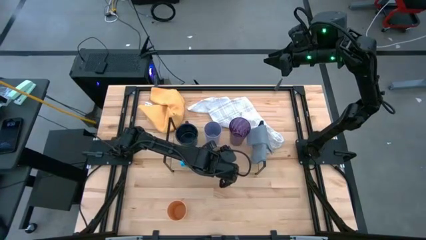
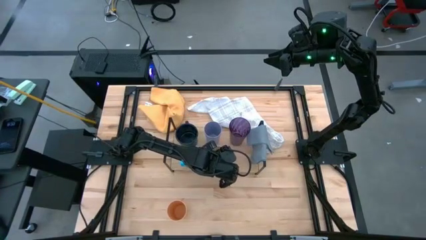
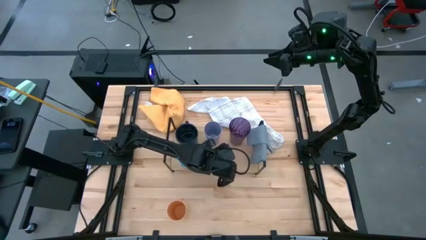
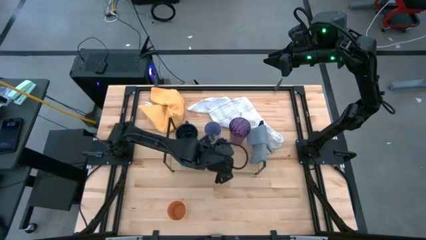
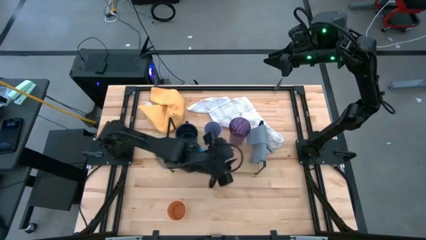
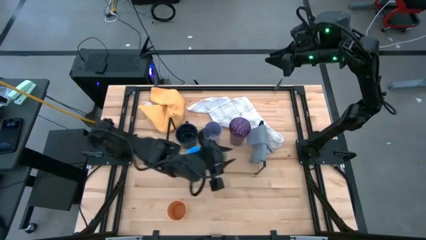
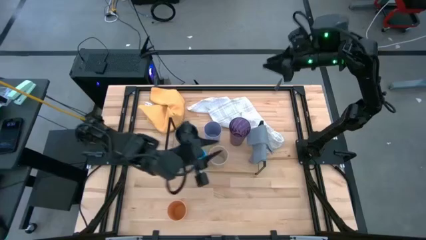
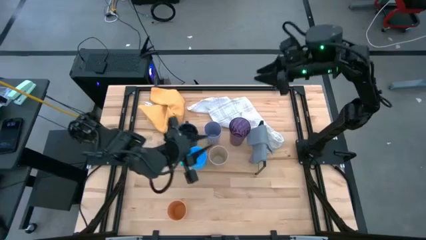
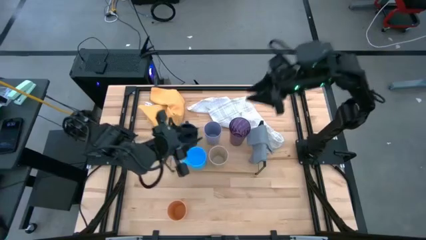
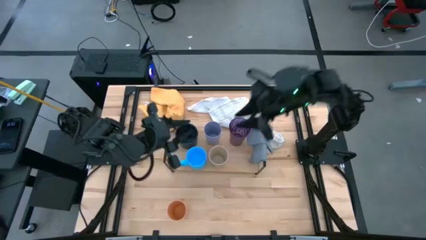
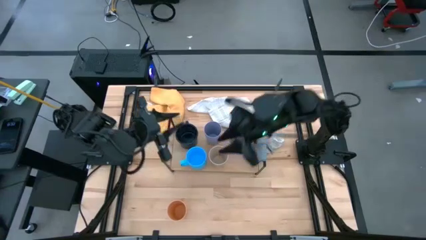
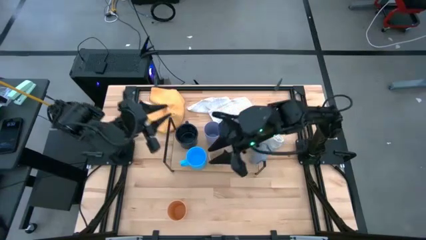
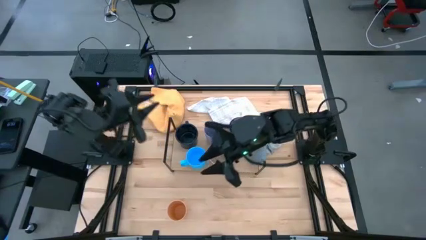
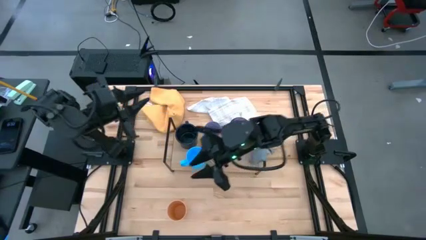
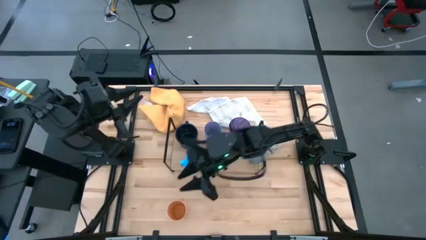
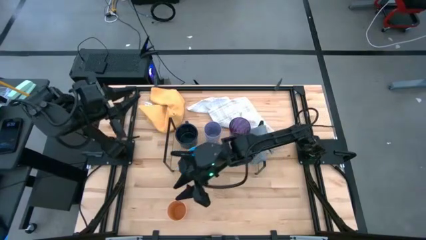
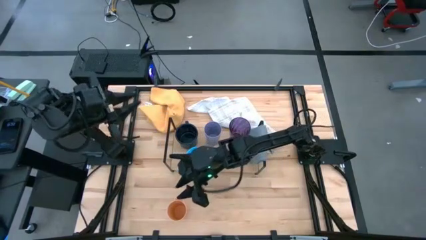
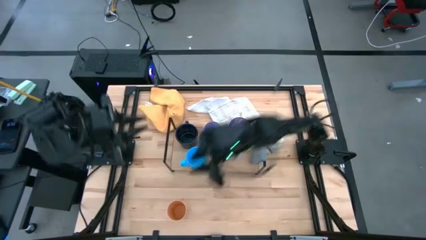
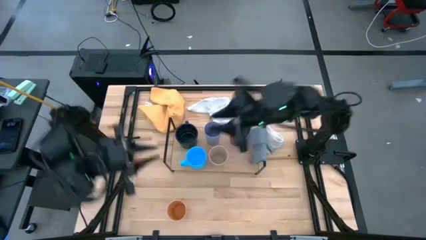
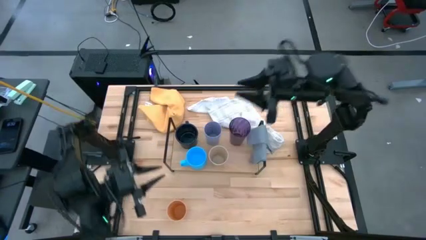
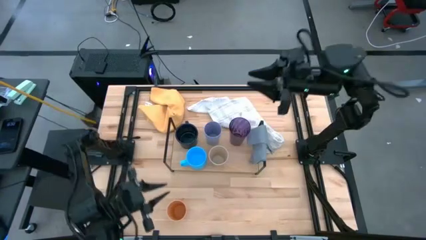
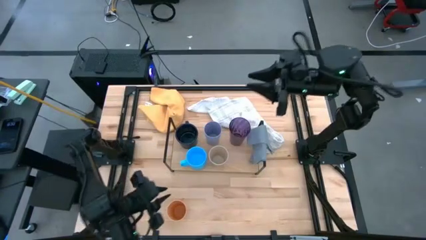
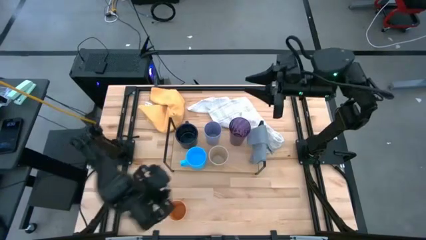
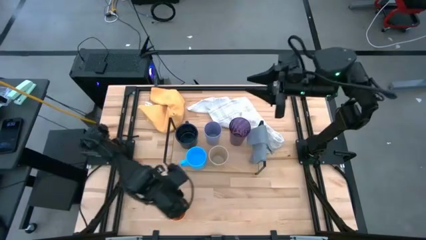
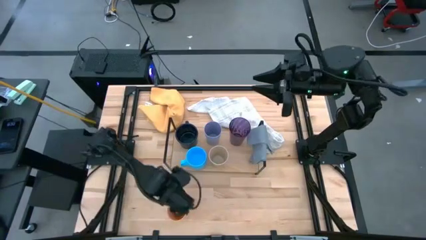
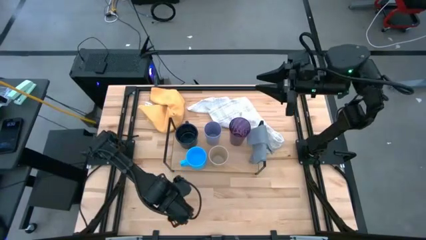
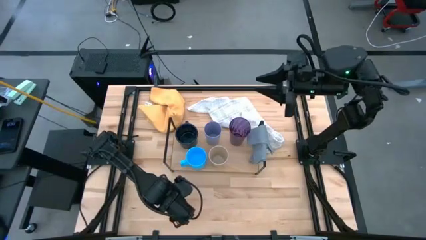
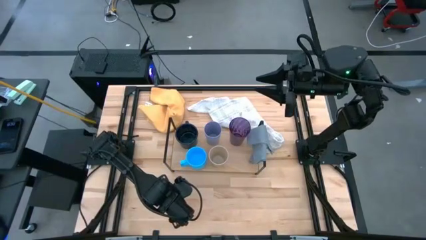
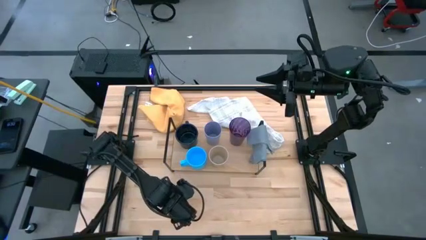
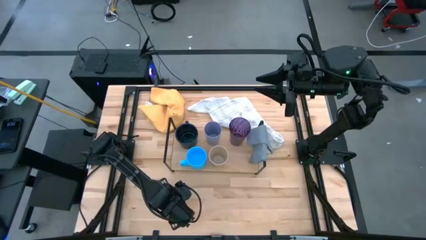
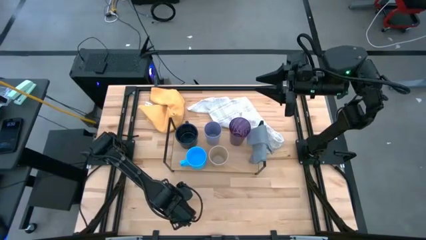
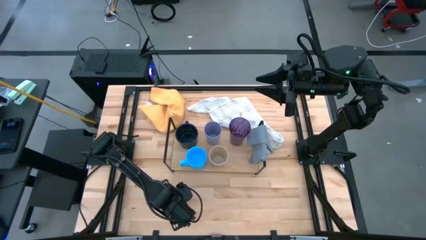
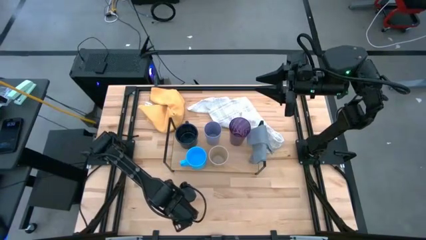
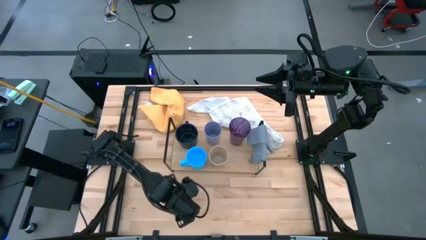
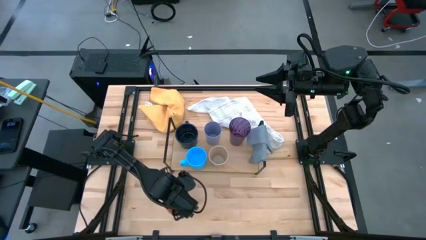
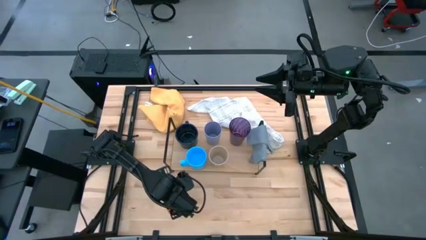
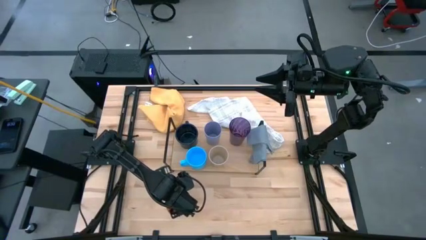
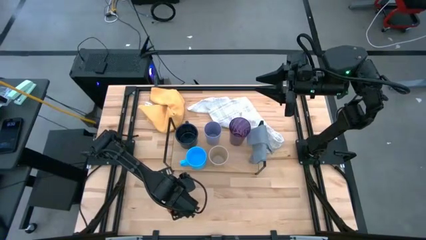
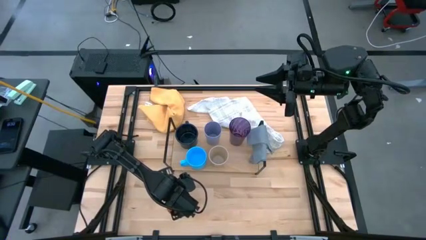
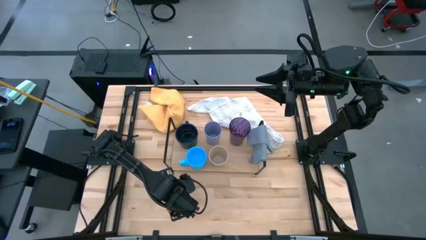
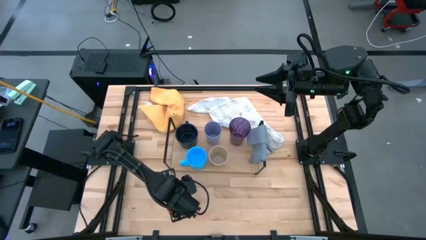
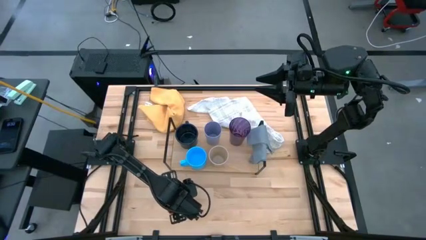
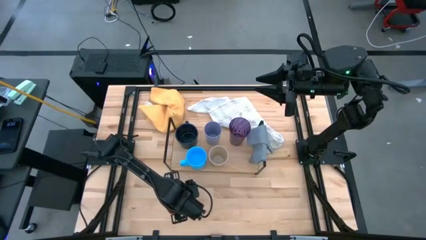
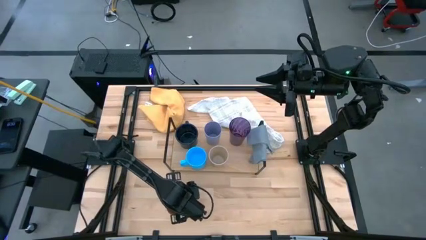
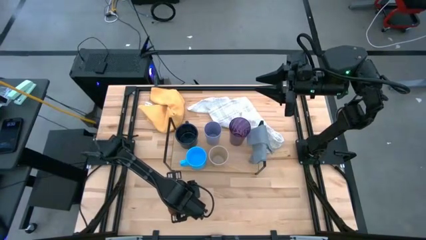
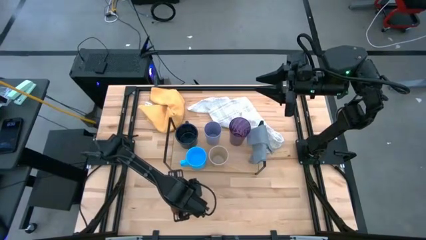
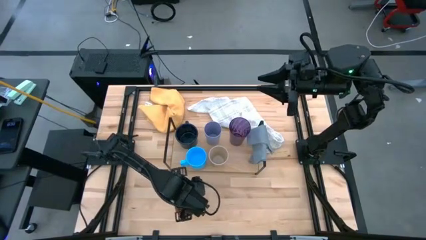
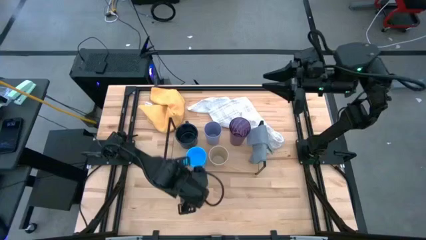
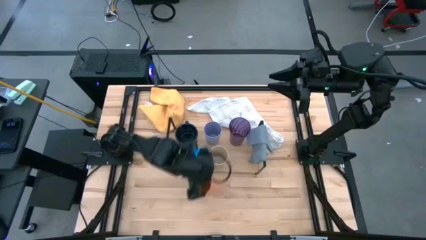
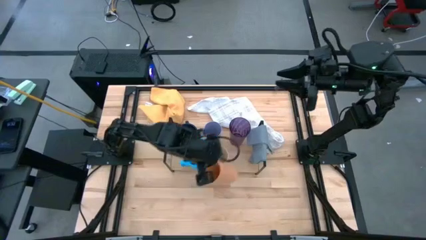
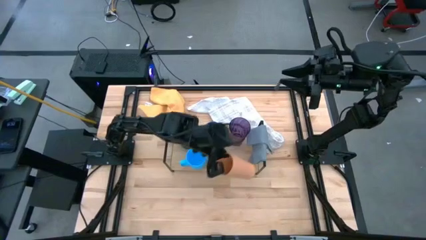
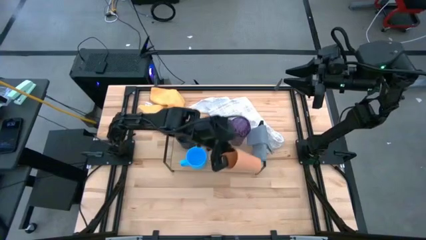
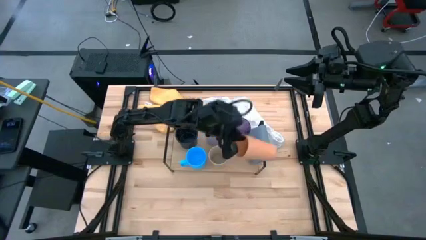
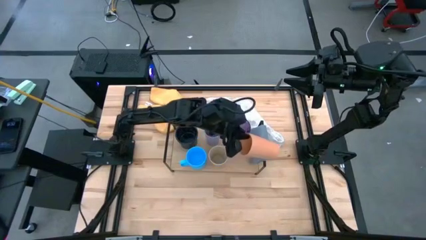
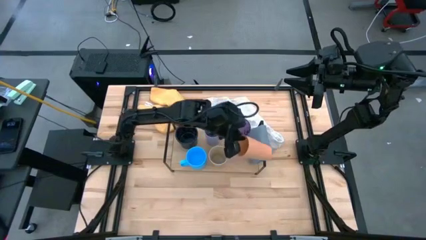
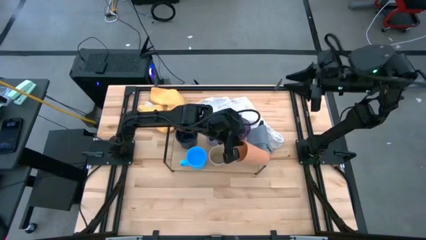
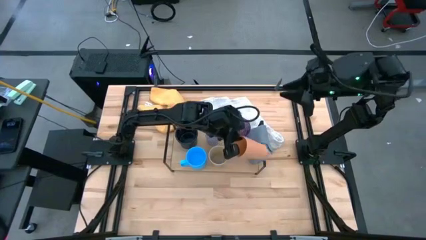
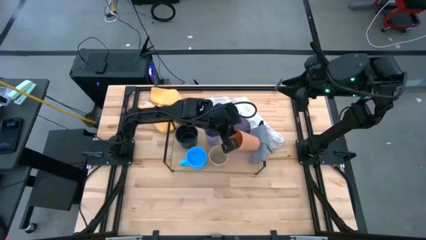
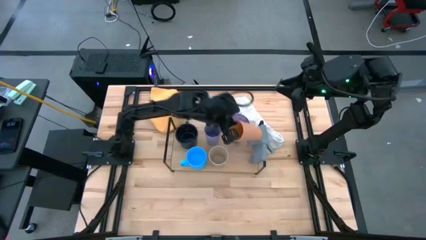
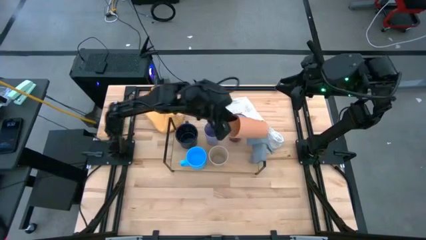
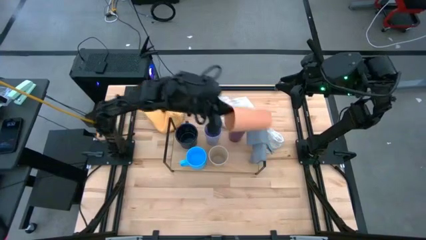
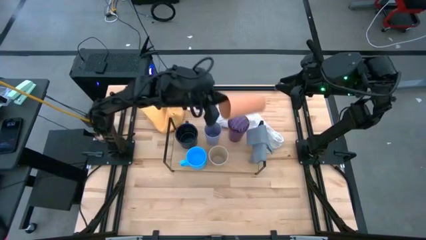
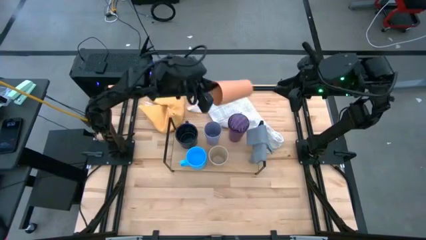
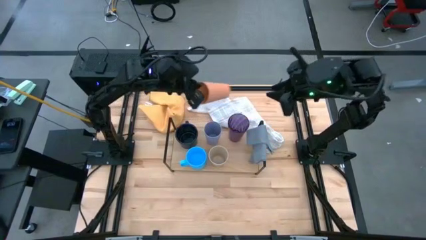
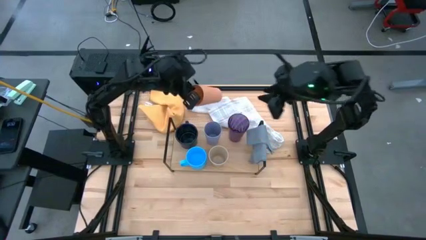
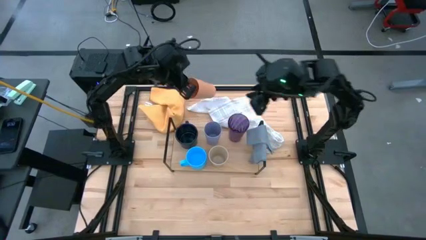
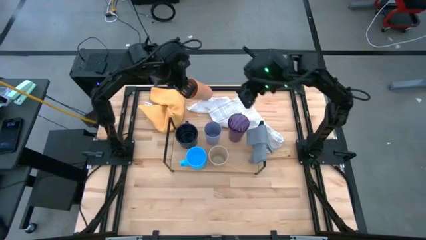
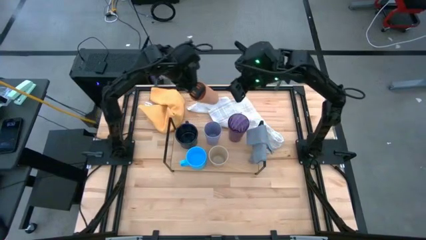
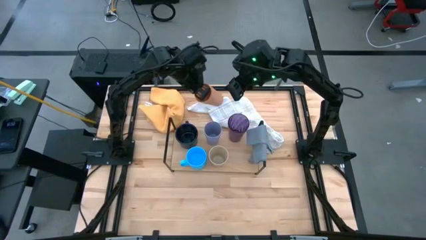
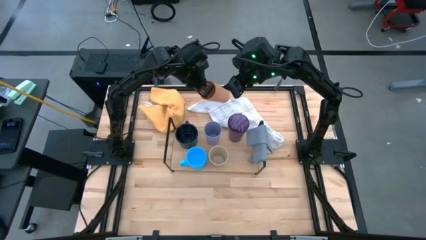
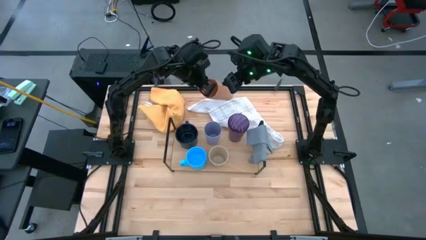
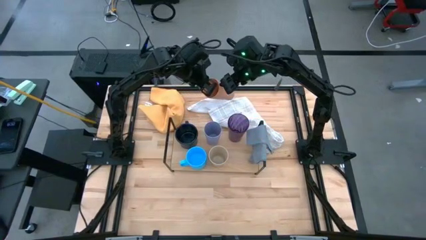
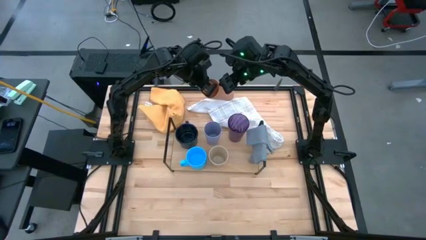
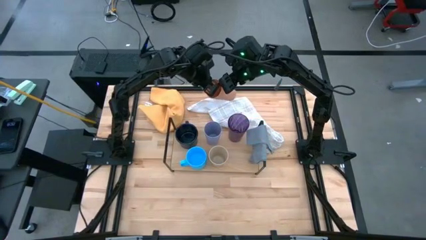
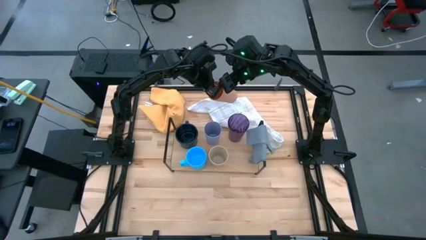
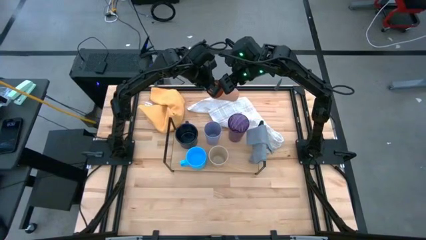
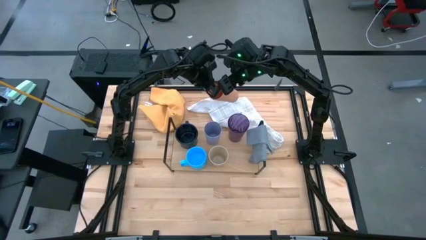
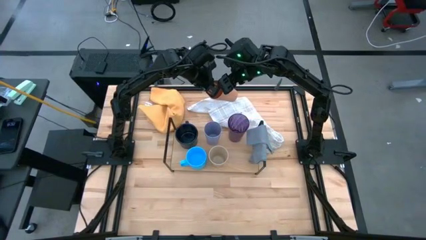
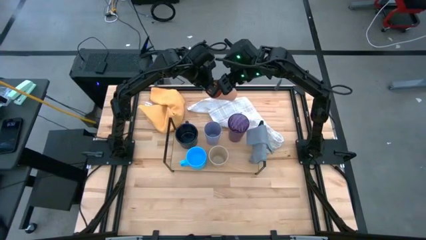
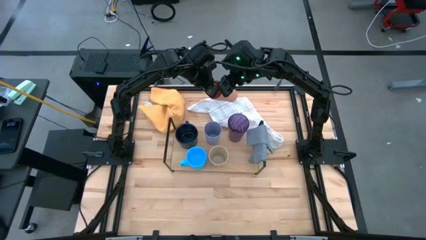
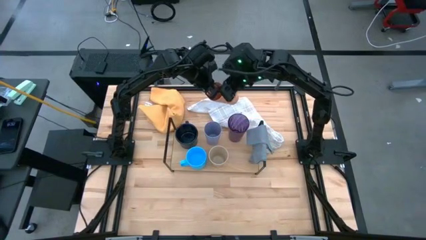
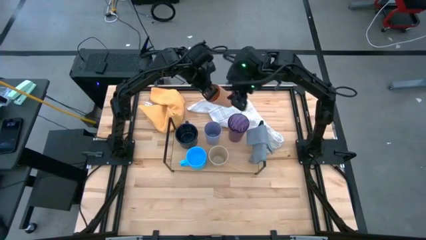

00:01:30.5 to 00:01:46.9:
Task: Stack small to large cups/mugs on shelf
Put the orange cup on the shelf
